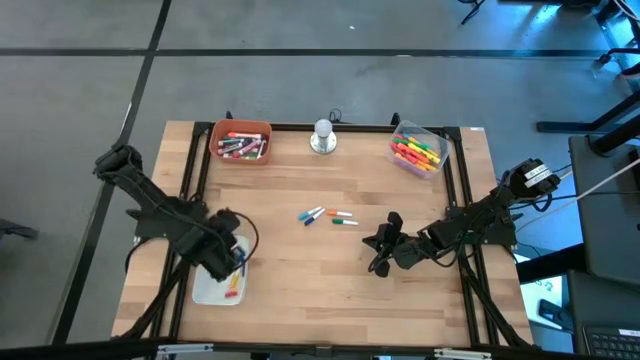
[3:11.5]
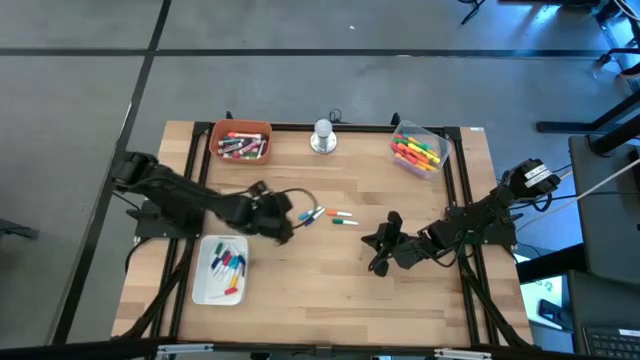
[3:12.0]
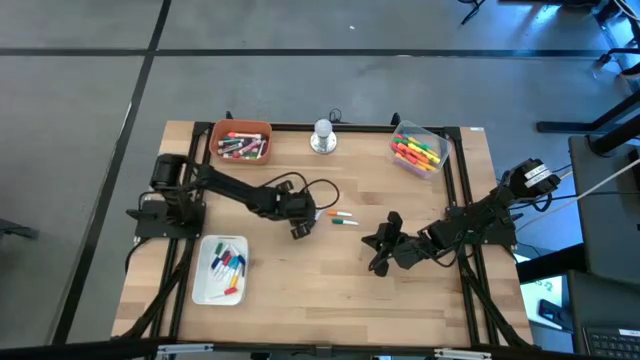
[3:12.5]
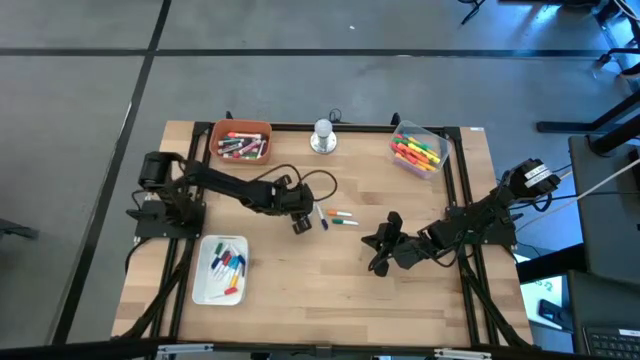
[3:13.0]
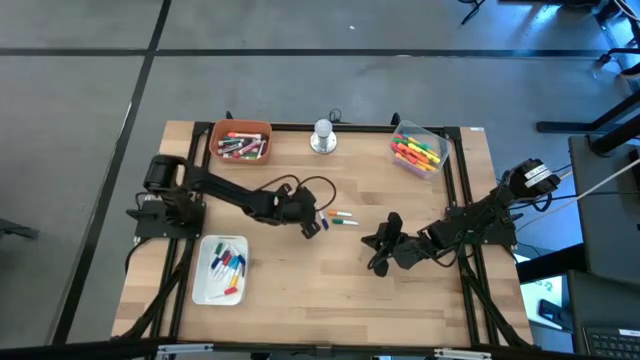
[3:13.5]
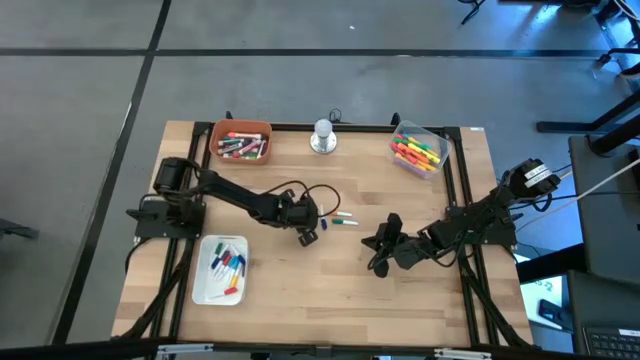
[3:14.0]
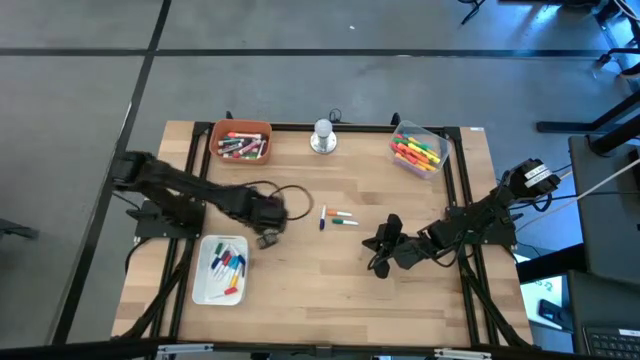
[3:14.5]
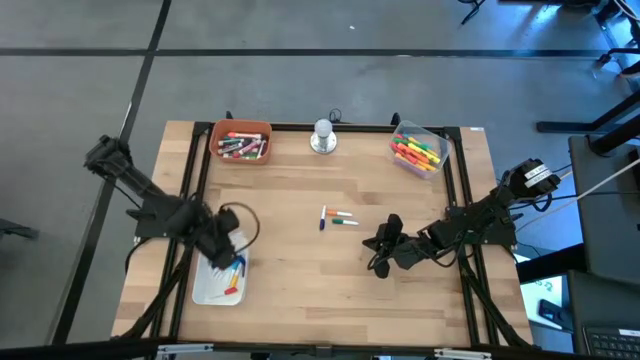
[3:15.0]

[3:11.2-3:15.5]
Task: Pick & Place Markers
Put the small light blue highlighter pen into the white bin

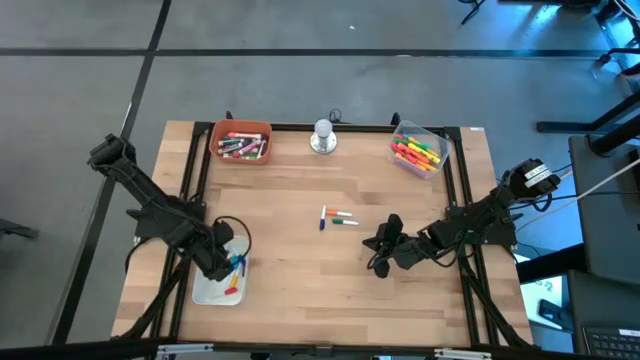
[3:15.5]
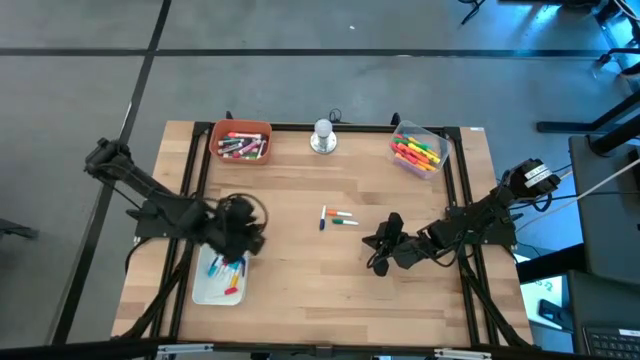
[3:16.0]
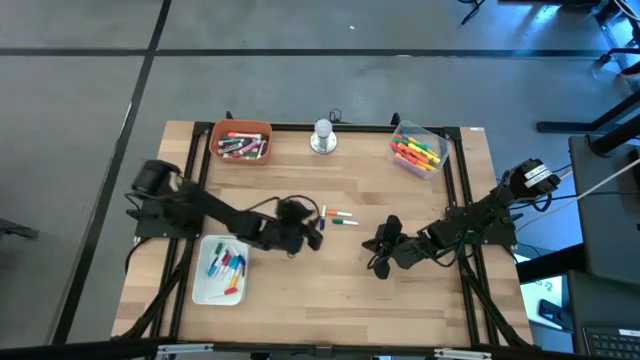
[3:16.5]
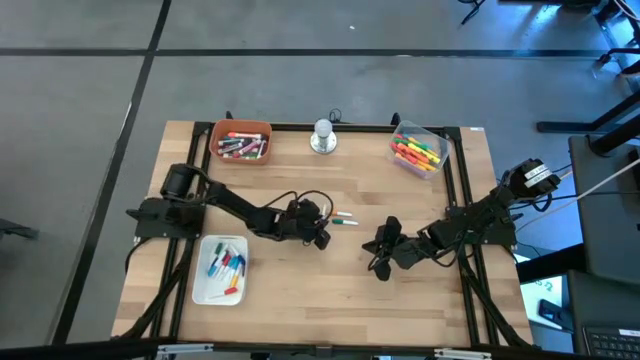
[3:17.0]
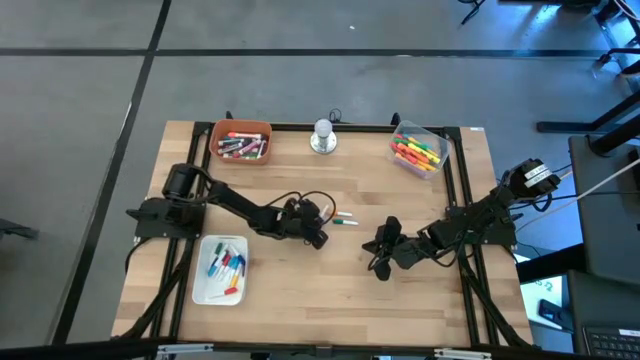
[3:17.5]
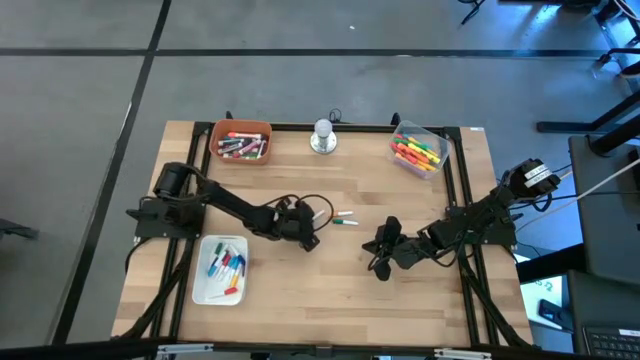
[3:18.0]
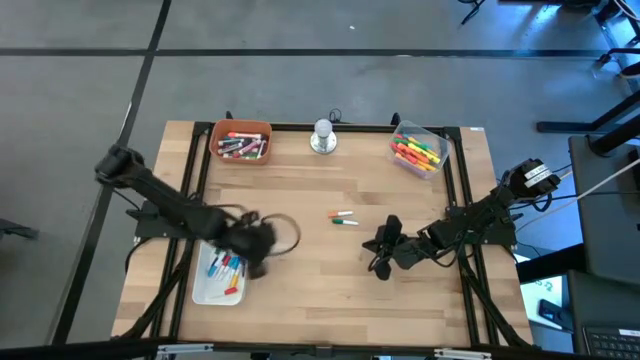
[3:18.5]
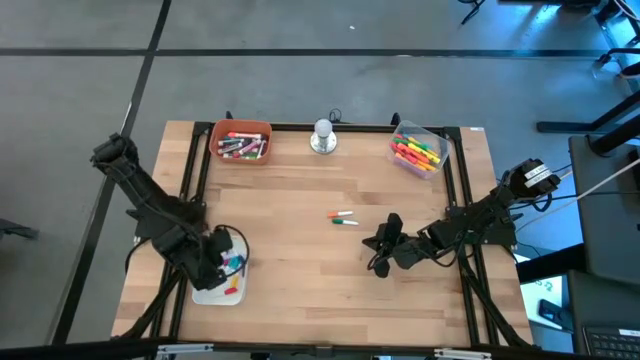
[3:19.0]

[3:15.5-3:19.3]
Put the small blue highlighter pen into the white bin

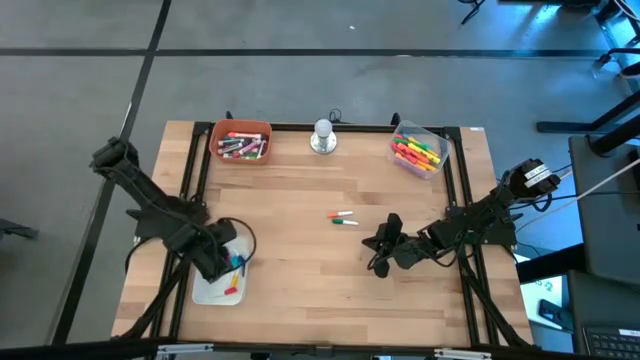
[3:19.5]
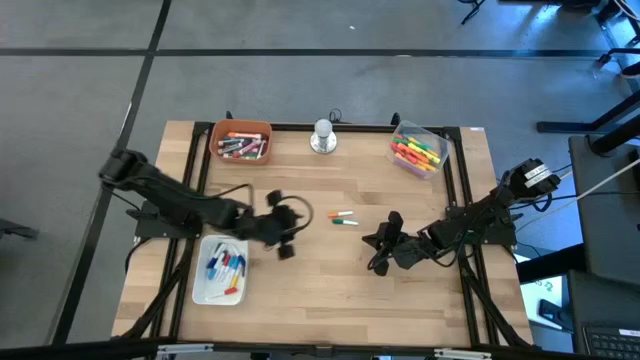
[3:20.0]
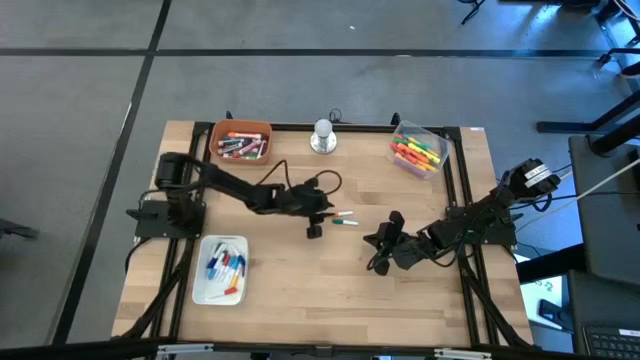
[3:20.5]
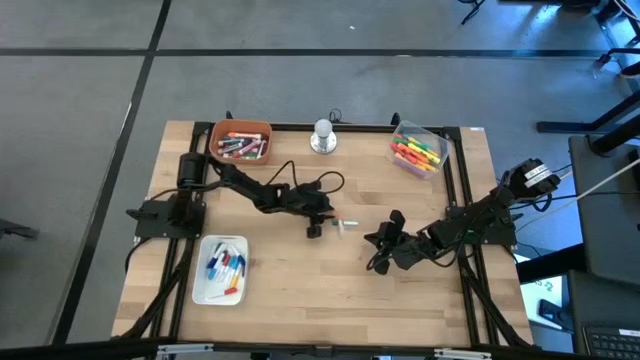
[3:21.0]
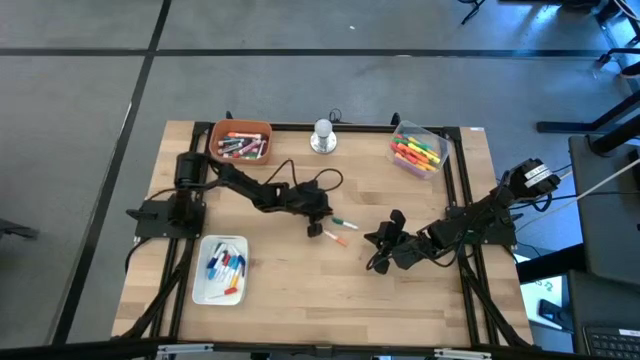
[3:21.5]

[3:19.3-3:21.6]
Put the small orange highlighter pen into the white bin

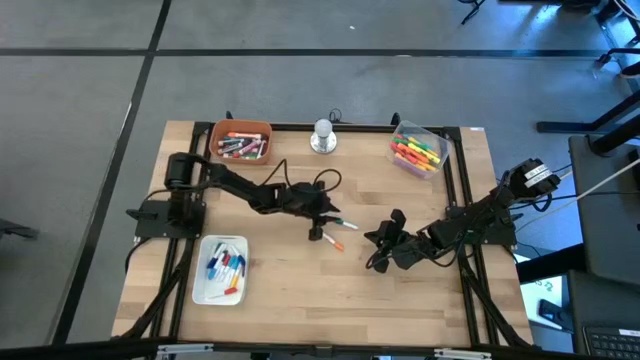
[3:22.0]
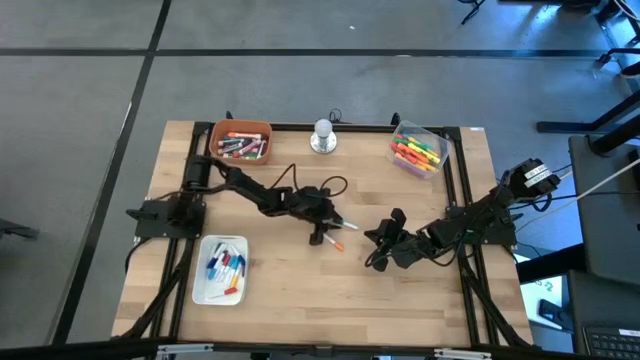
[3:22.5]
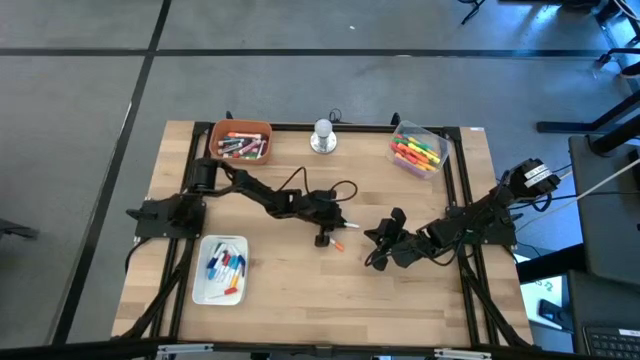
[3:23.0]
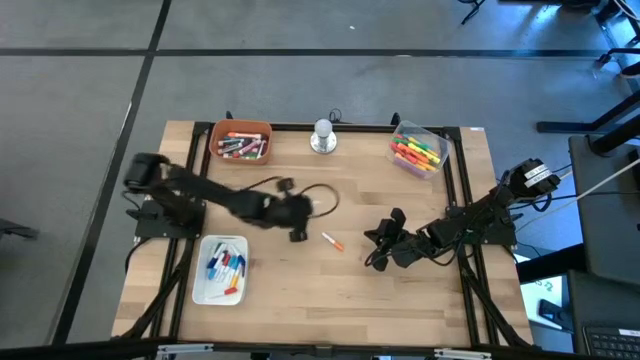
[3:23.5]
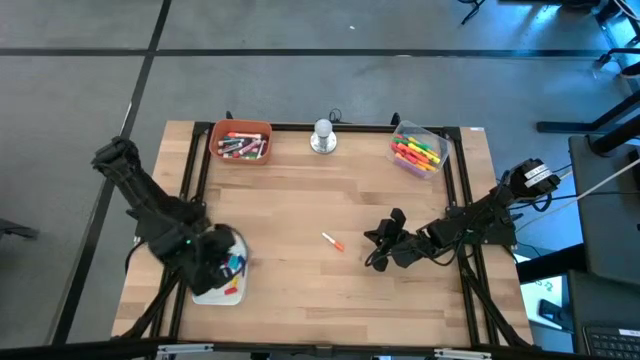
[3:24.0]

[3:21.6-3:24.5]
Put the small green highlighter pen into the white bin

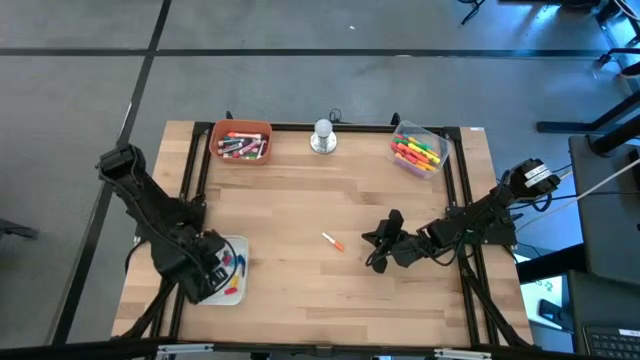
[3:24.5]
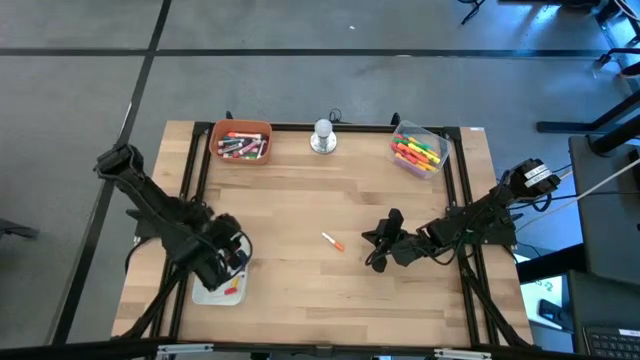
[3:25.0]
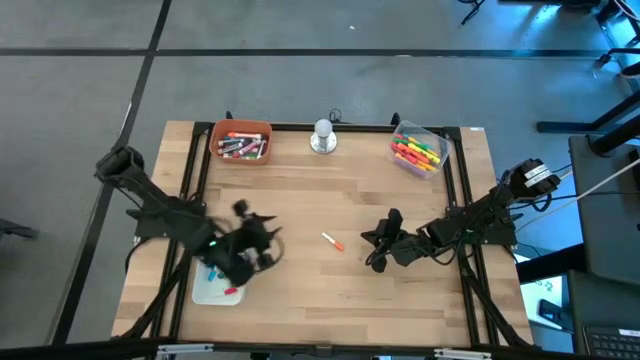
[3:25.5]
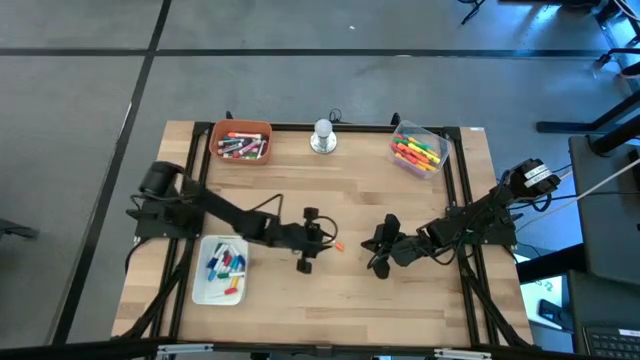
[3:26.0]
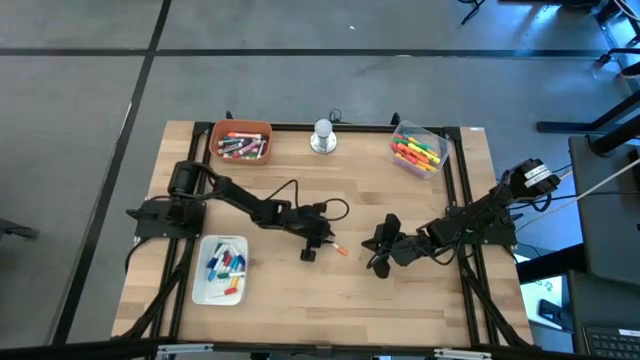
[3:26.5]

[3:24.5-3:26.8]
Put the small orange highlighter pen into the white bin

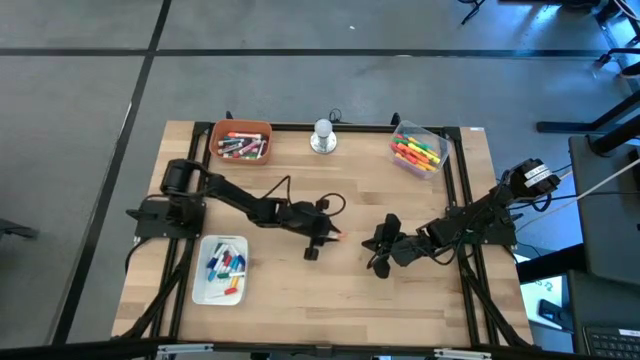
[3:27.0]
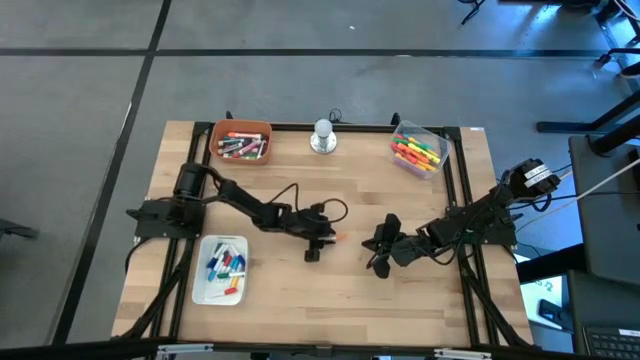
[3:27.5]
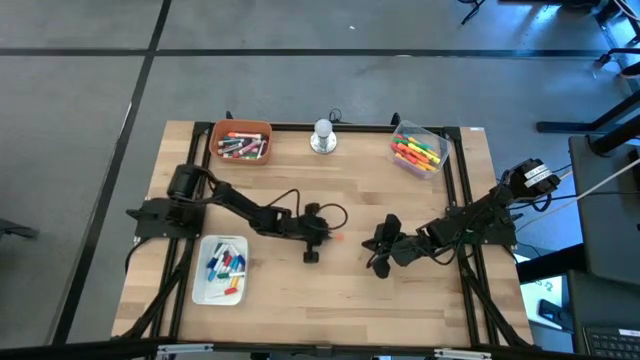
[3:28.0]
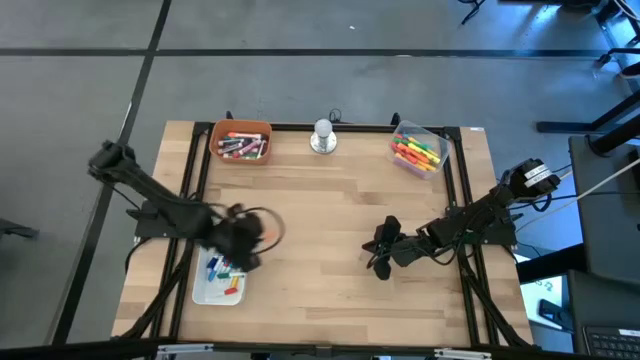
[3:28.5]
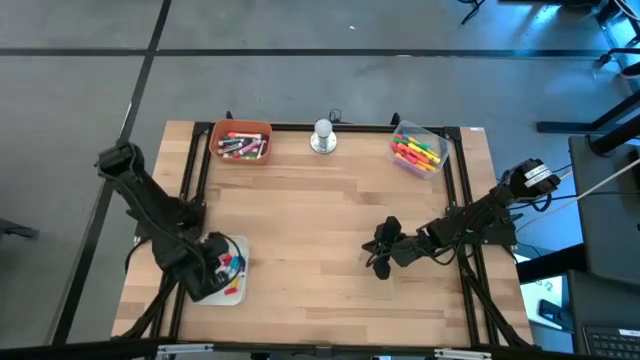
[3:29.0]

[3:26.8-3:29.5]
Put the small orange highlighter pen into the white bin

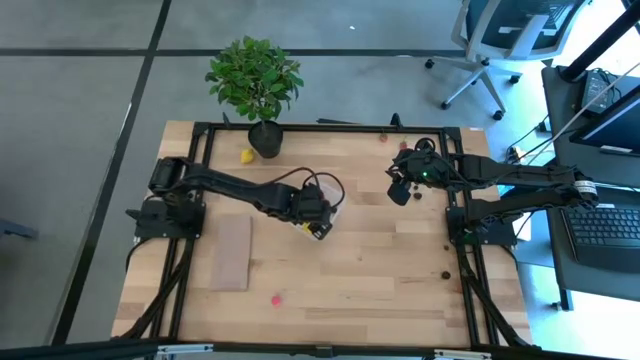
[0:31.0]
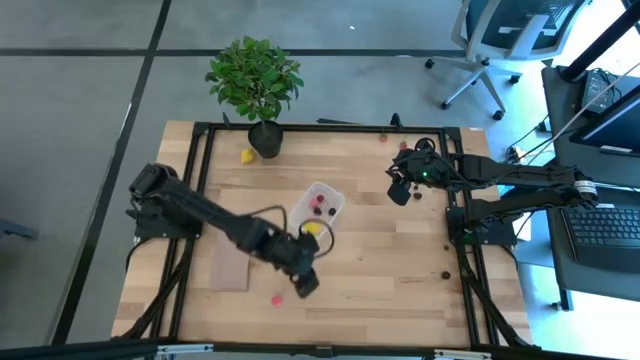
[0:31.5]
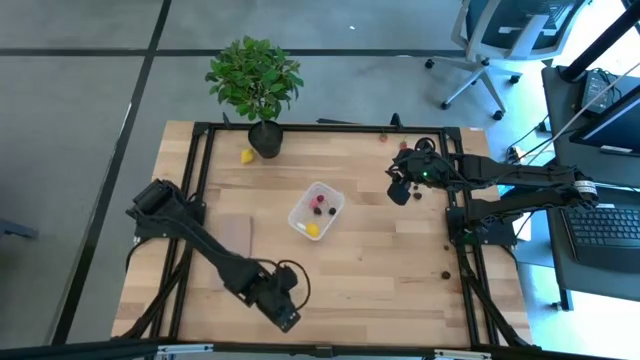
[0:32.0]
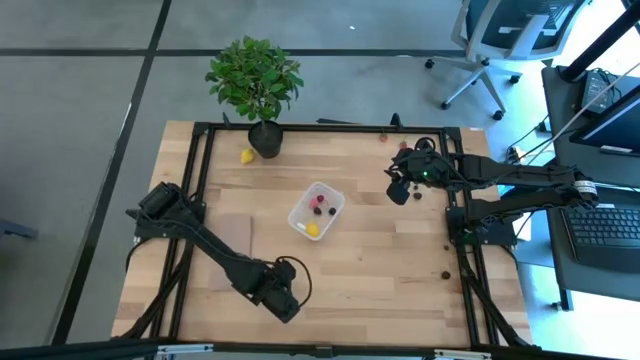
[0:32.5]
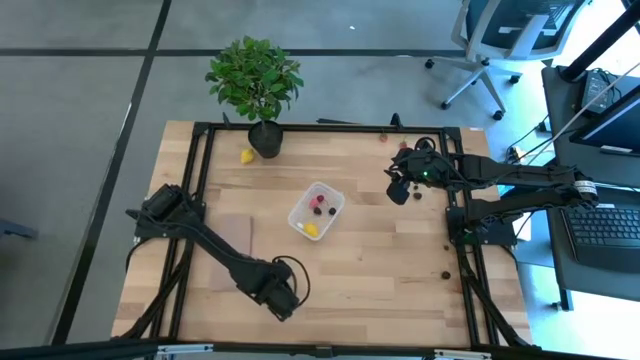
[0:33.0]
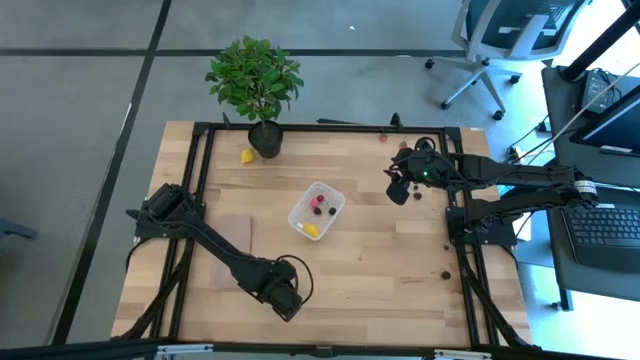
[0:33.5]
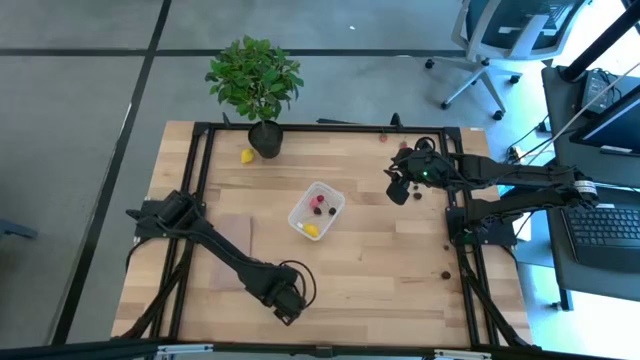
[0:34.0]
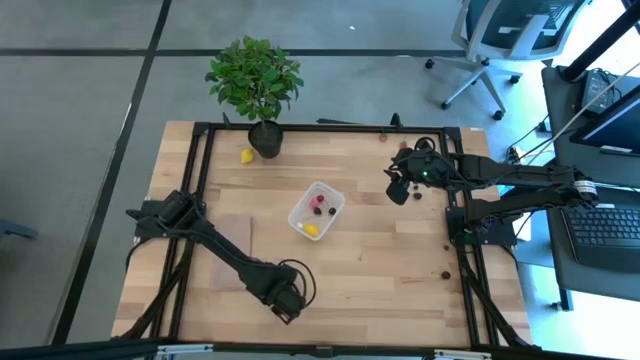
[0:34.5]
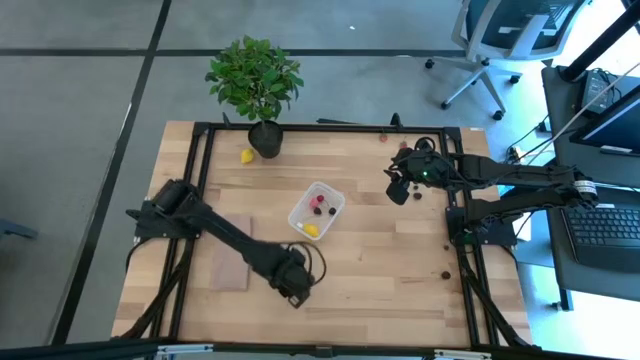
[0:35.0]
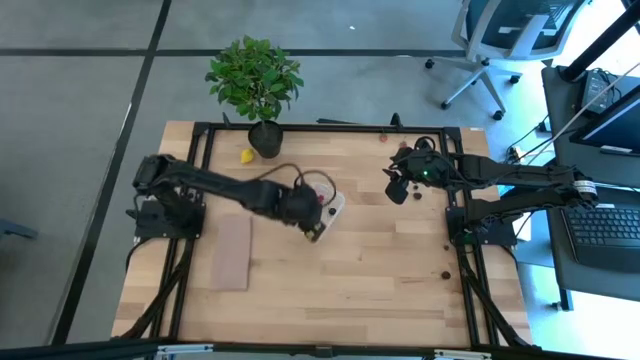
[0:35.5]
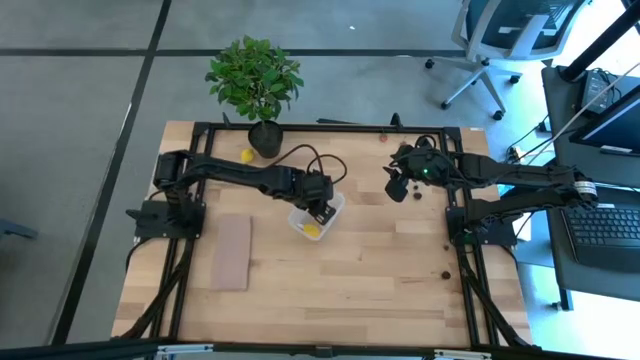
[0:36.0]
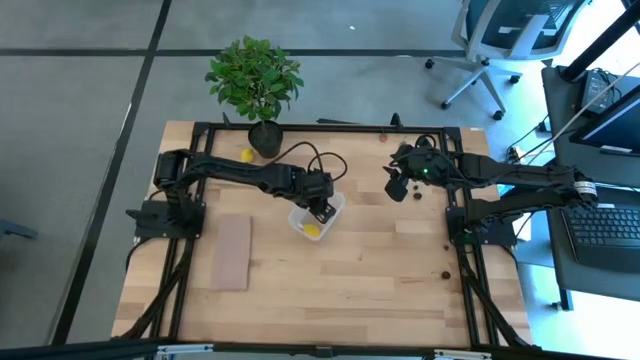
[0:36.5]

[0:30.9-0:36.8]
Task: Pick and placing Produce into tupperware
Put the bottom peach into the transparent bin
